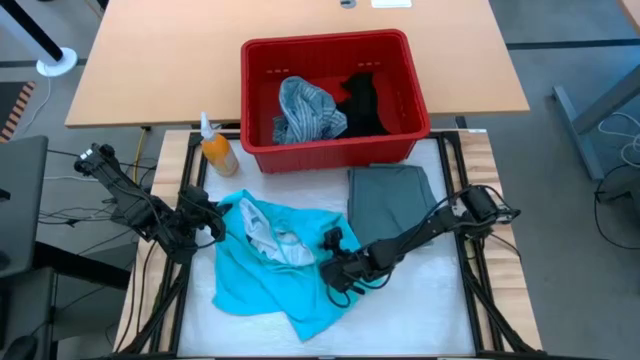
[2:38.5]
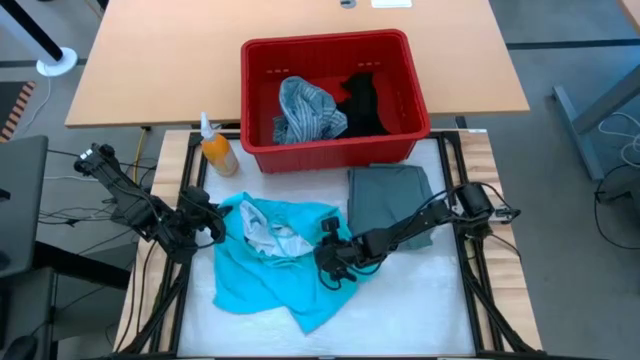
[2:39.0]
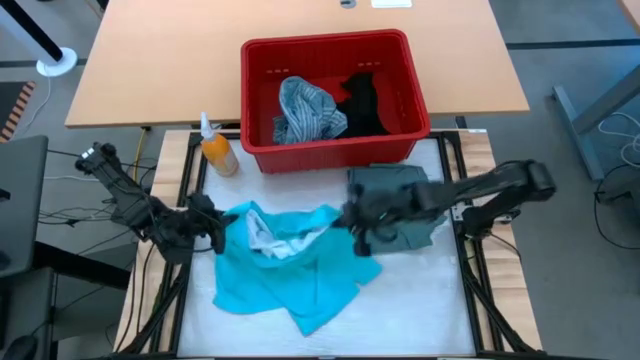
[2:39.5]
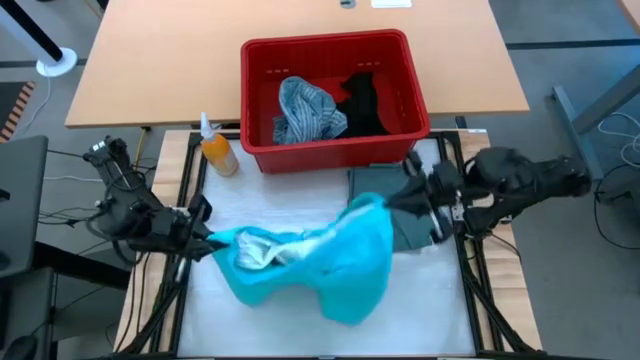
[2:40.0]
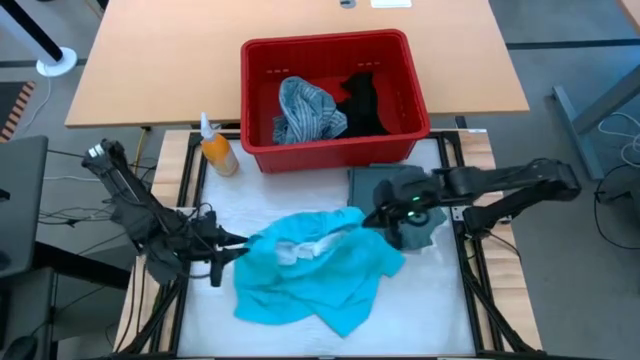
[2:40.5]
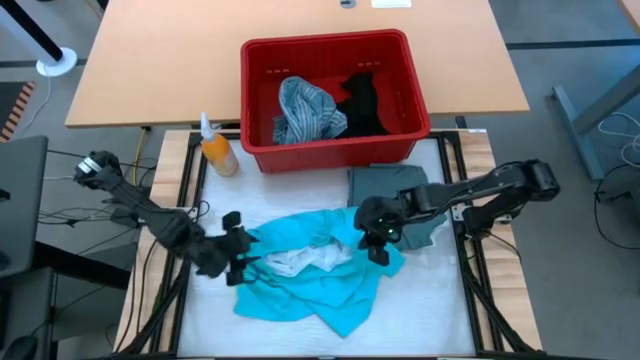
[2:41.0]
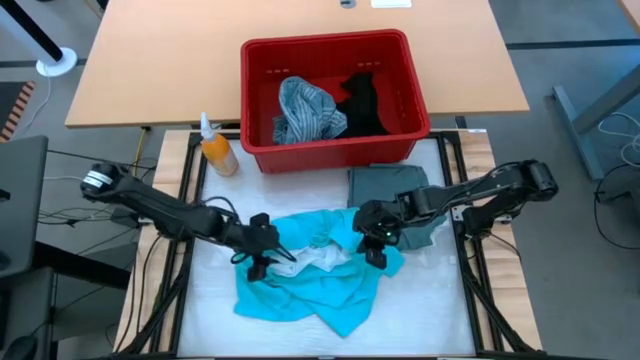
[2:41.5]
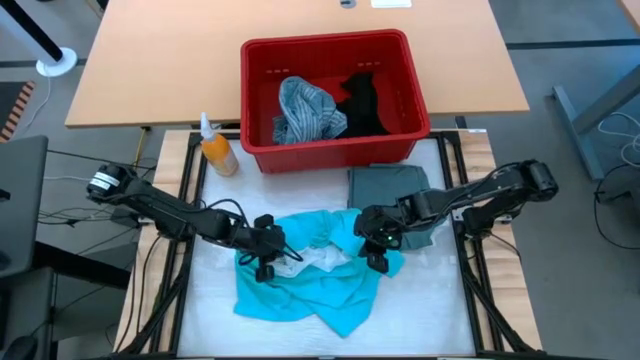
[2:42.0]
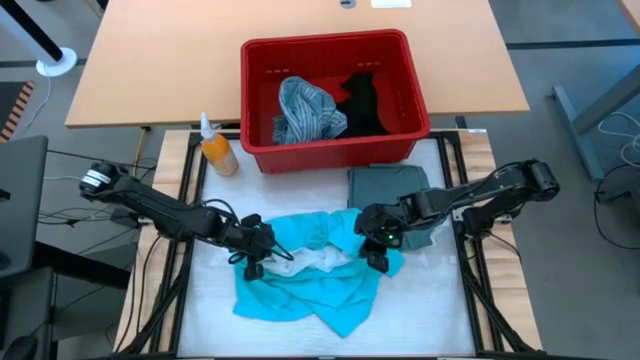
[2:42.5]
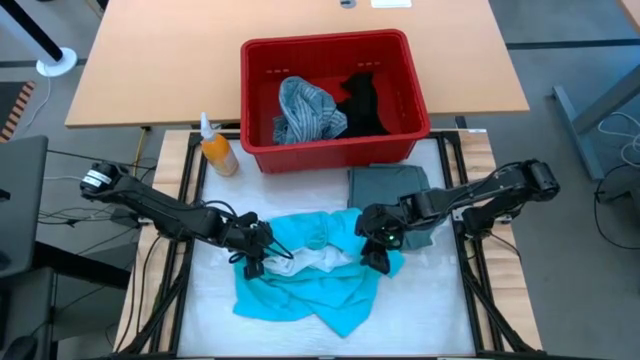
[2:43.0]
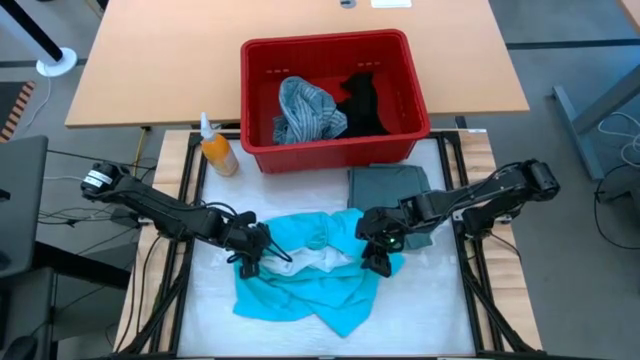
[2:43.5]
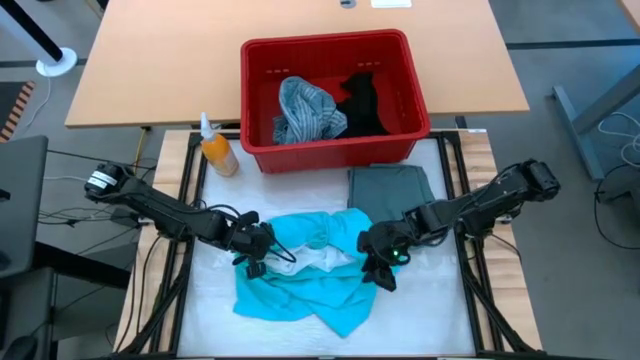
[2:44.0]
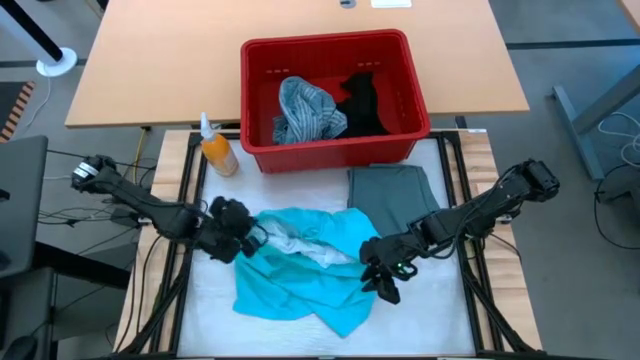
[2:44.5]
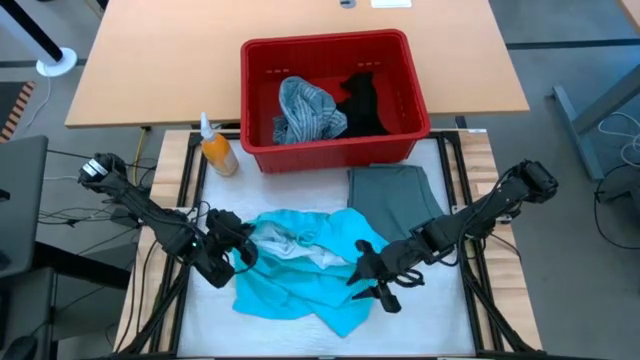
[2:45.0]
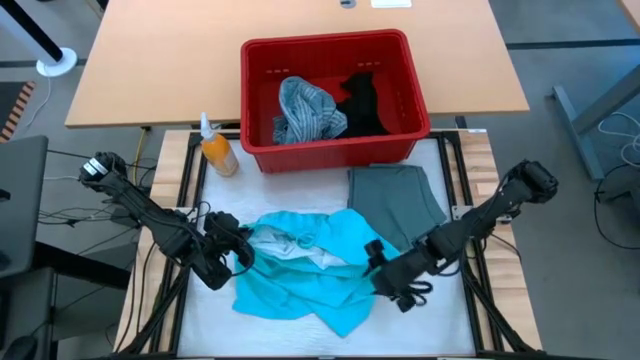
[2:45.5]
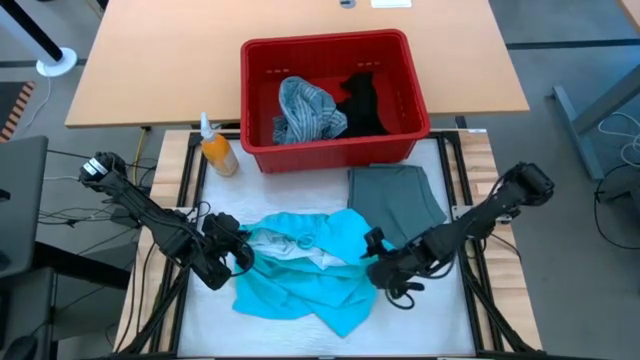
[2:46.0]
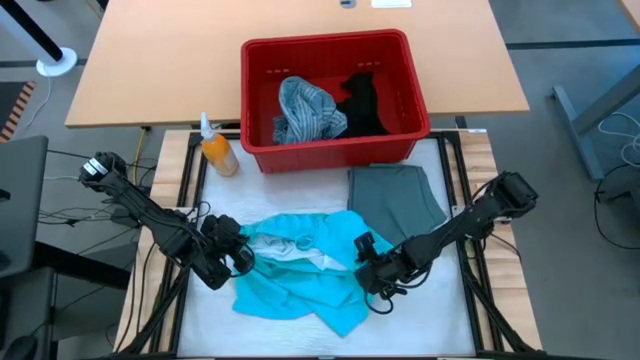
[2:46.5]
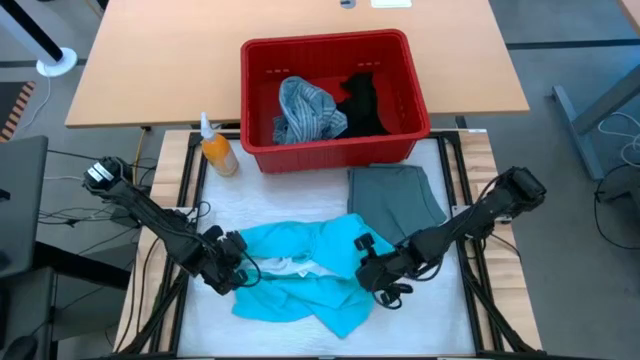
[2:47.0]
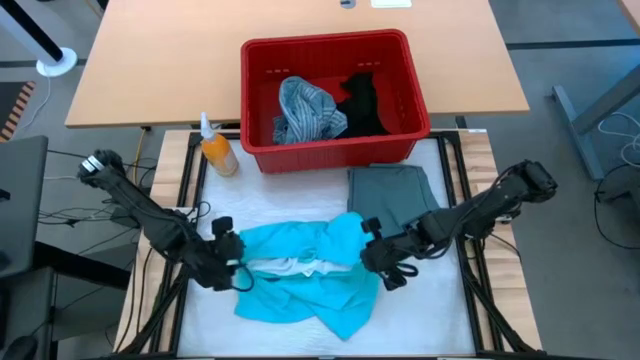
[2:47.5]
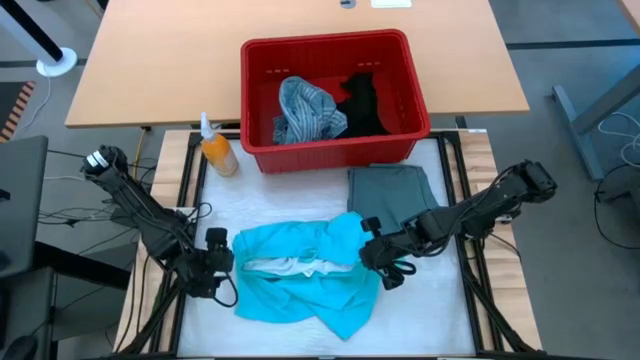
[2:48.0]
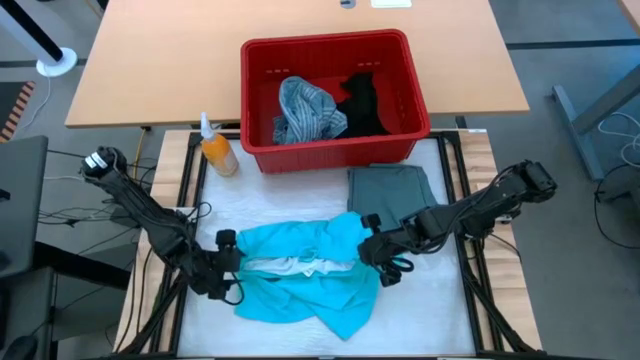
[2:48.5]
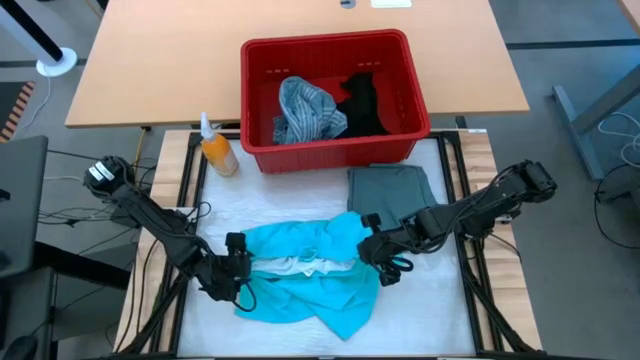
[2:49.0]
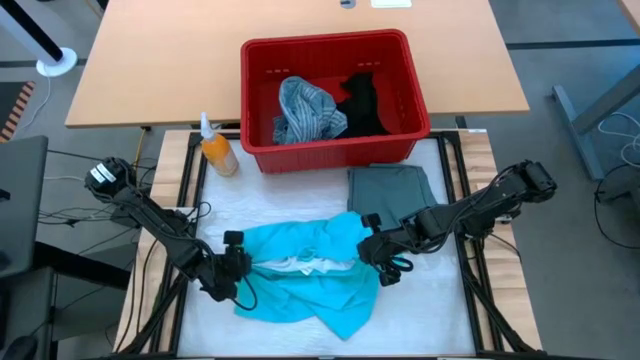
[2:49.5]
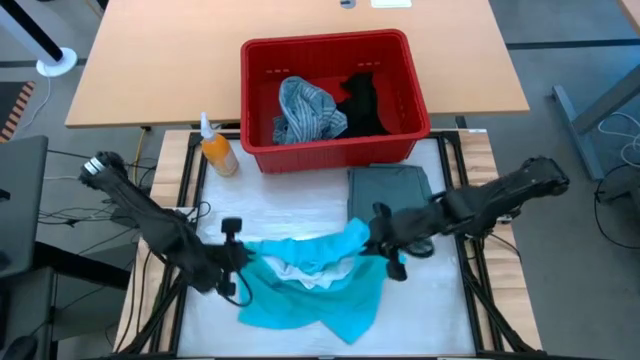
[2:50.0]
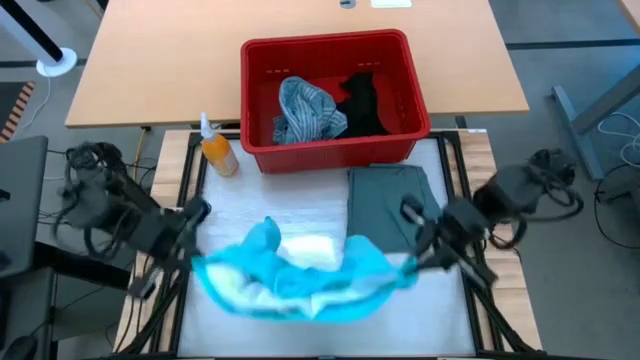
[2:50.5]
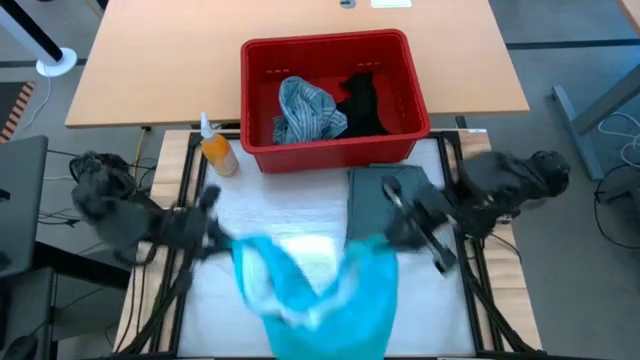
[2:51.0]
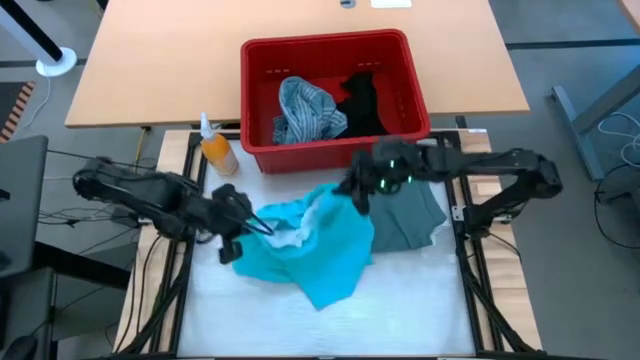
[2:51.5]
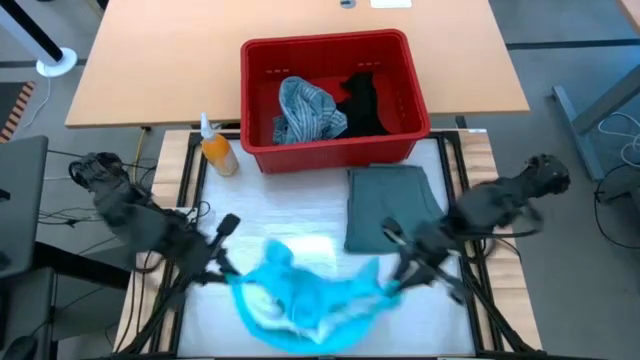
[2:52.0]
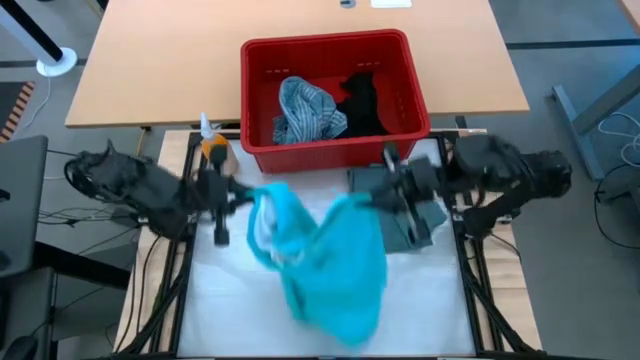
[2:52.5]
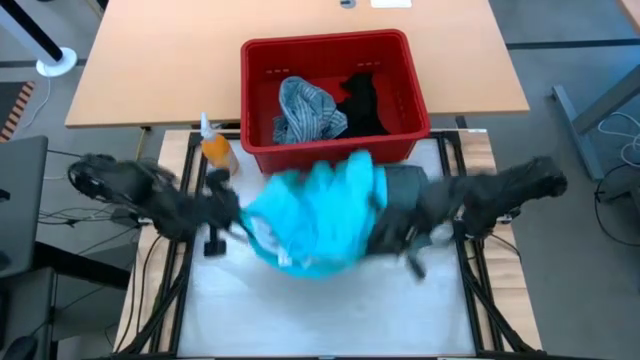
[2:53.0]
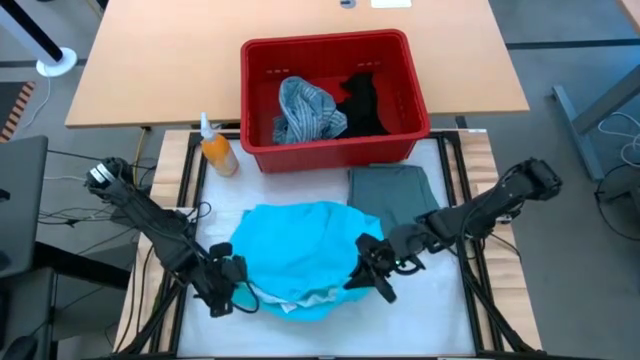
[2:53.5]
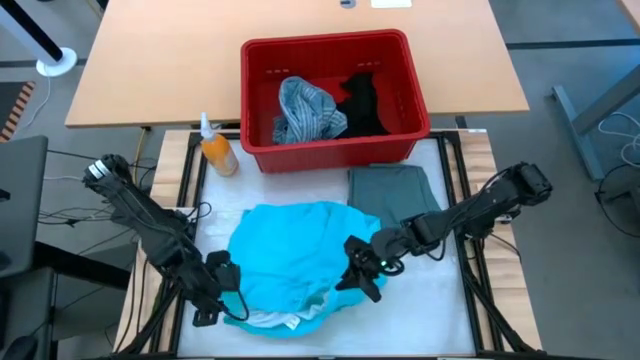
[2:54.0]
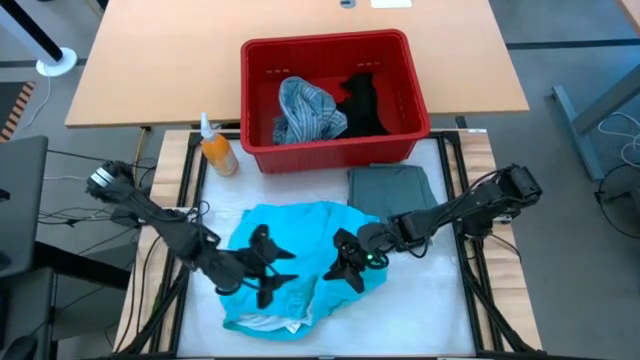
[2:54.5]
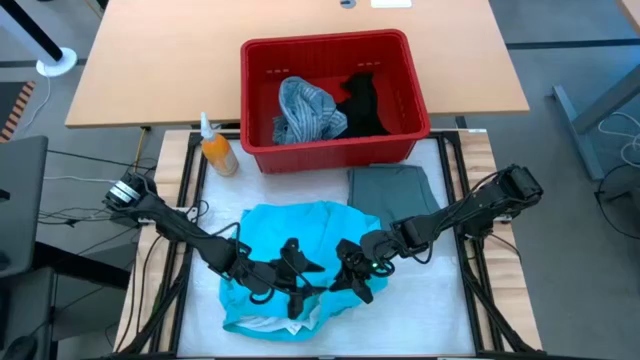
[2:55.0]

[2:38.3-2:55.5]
Task: Fold Laundry from Bin
Fold the light blue shorts

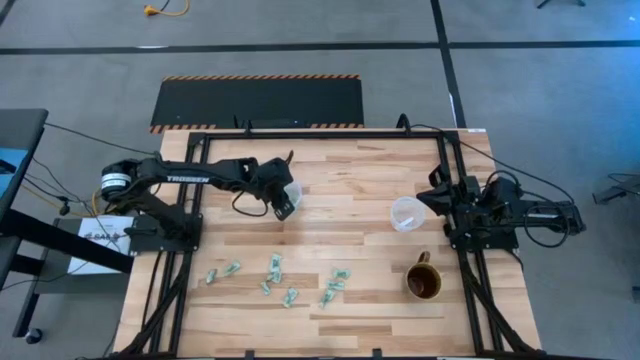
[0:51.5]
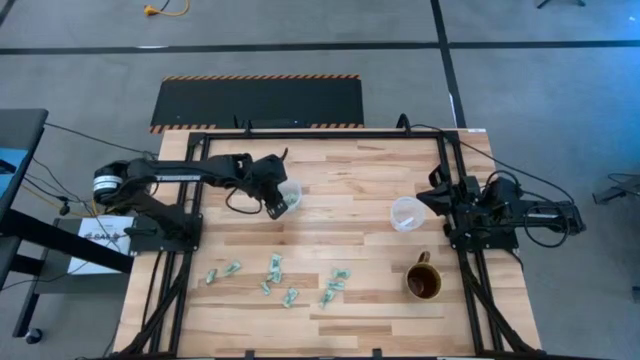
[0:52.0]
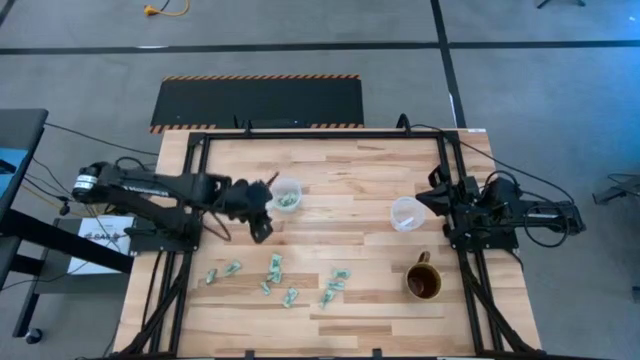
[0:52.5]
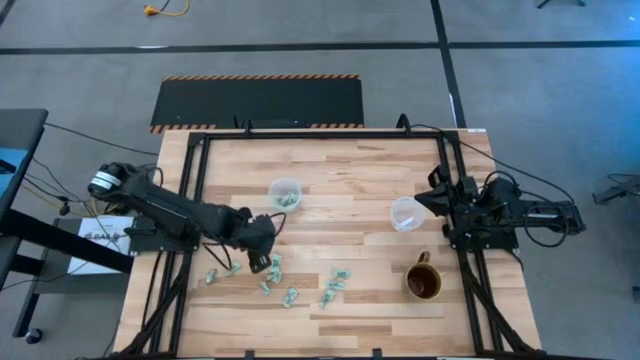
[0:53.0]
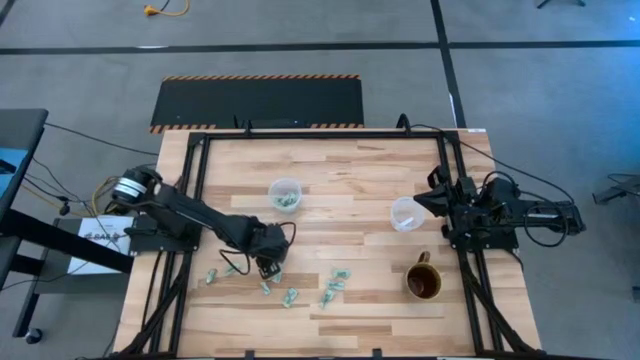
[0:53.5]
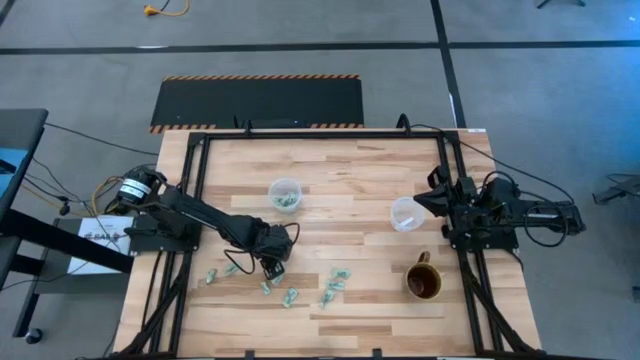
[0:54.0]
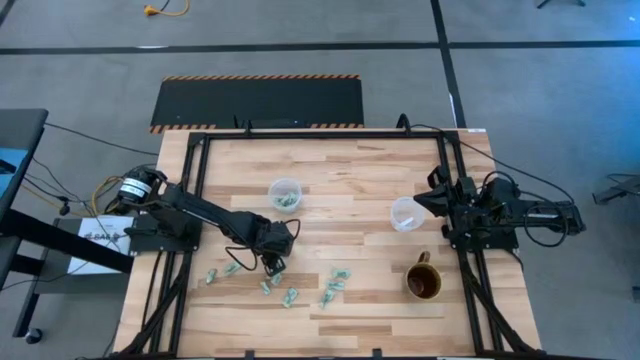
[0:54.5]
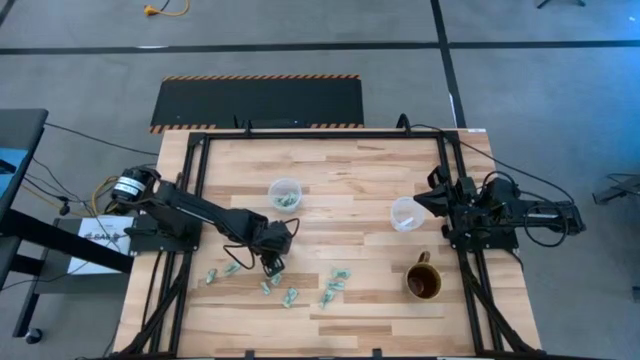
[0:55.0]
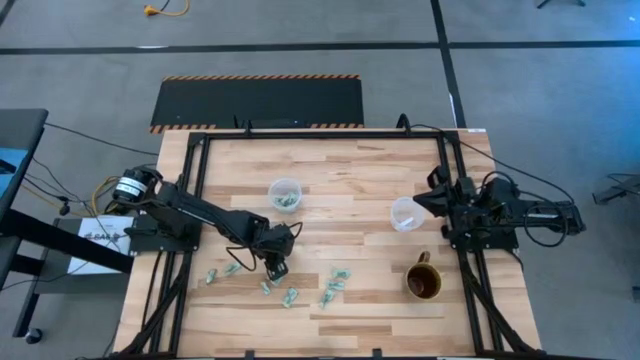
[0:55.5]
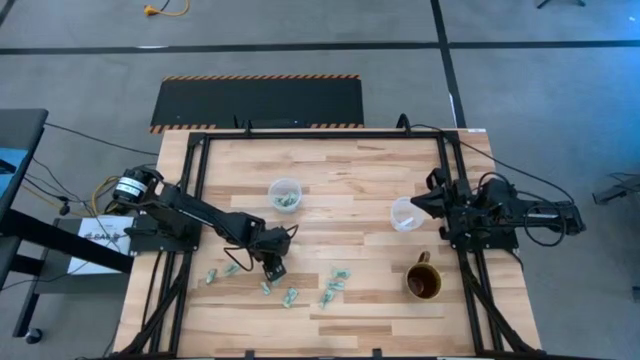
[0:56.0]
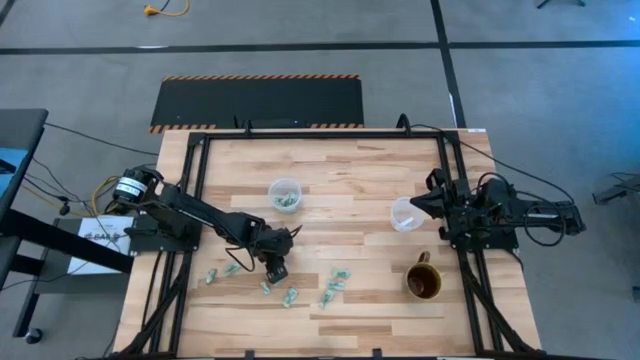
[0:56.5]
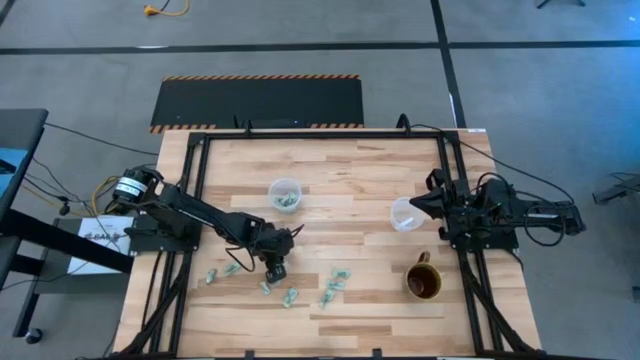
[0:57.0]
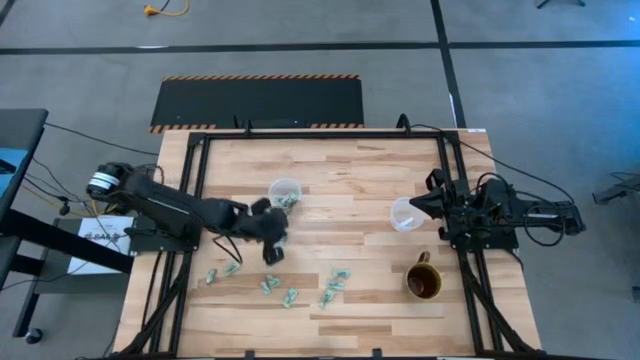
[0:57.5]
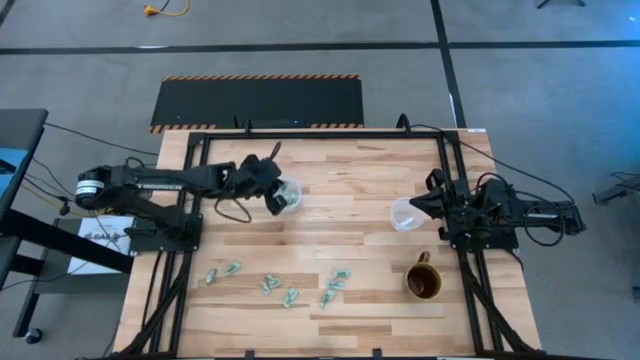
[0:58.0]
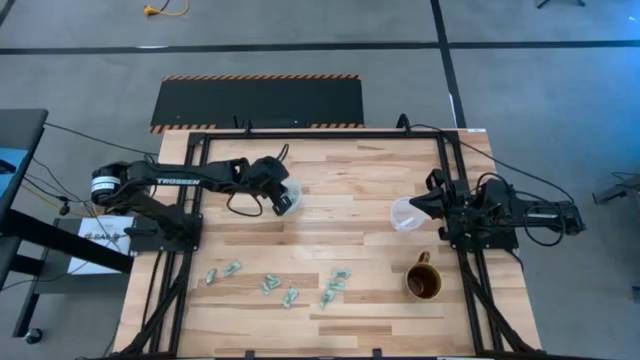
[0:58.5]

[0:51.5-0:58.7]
Task: Pick and place Stevia / Truvia into bins
Put the white stevia packet into the left transparent container
